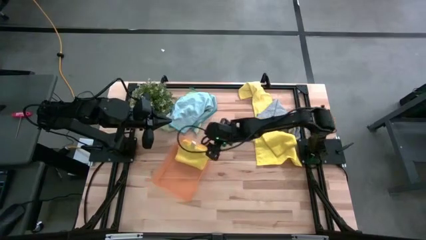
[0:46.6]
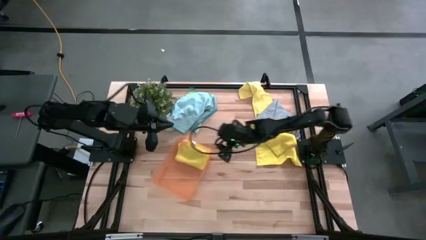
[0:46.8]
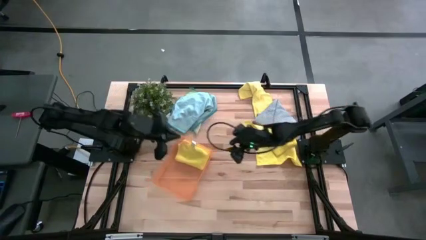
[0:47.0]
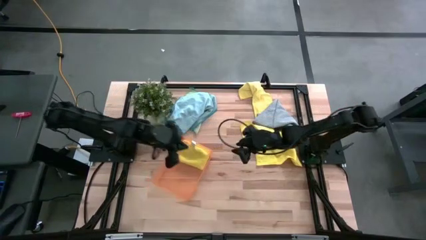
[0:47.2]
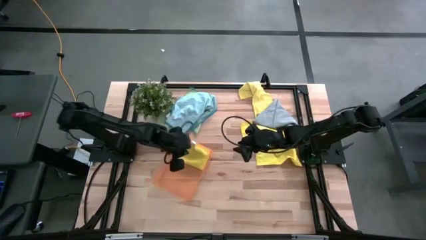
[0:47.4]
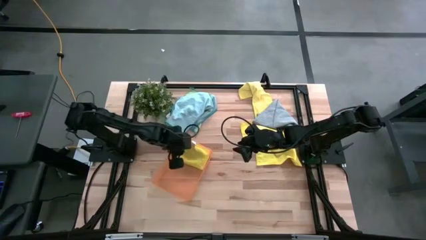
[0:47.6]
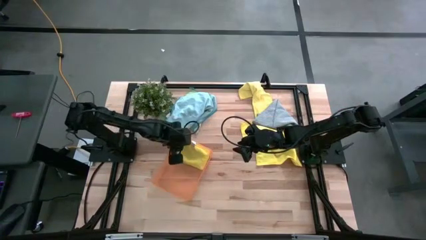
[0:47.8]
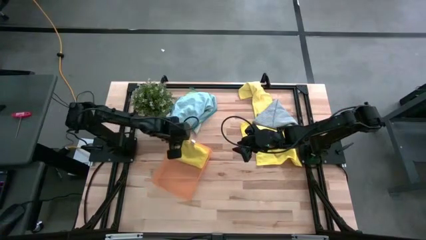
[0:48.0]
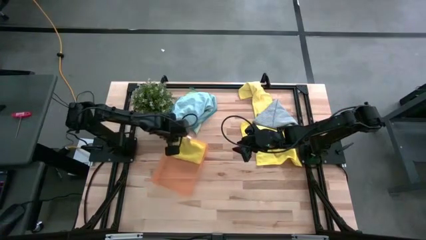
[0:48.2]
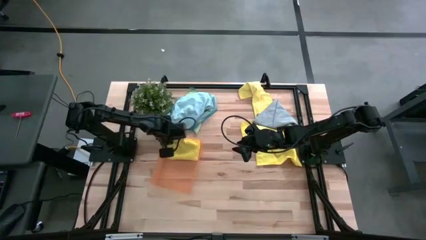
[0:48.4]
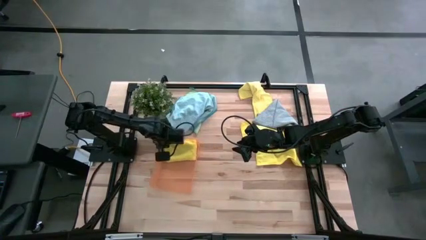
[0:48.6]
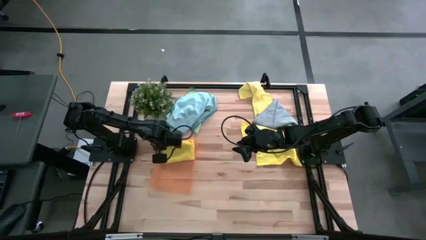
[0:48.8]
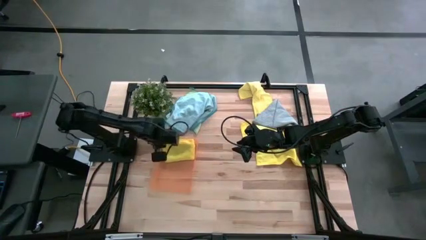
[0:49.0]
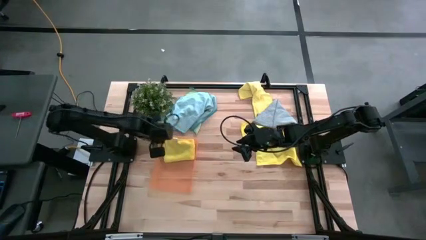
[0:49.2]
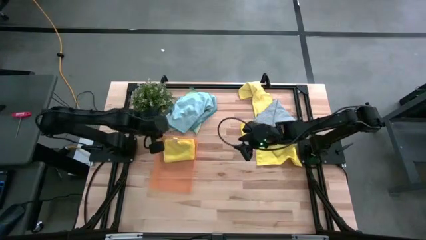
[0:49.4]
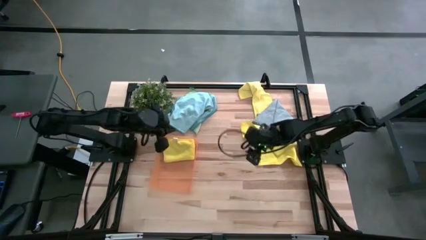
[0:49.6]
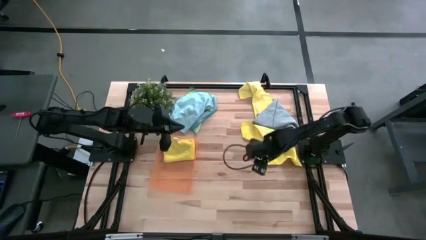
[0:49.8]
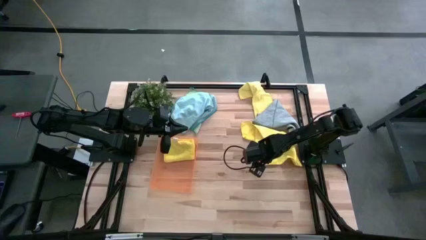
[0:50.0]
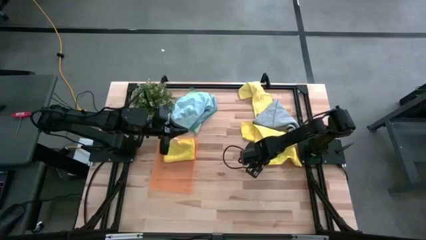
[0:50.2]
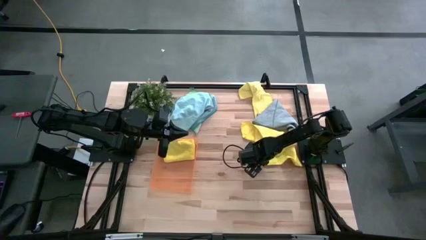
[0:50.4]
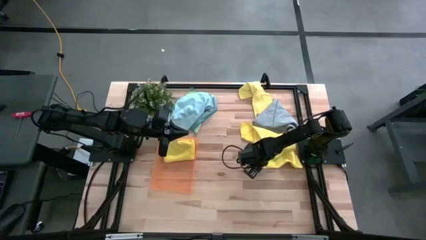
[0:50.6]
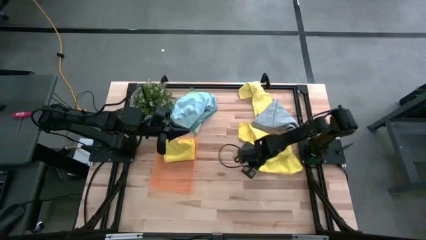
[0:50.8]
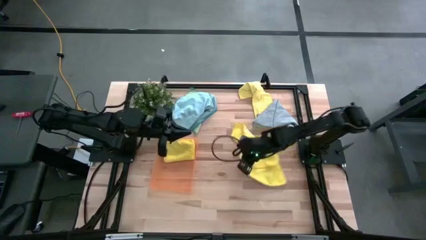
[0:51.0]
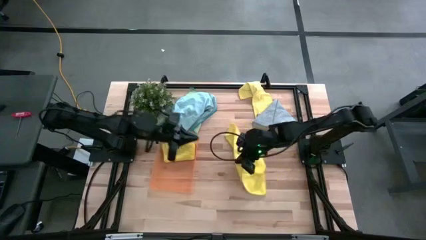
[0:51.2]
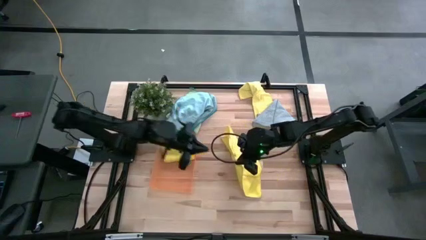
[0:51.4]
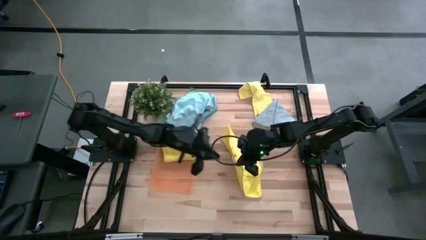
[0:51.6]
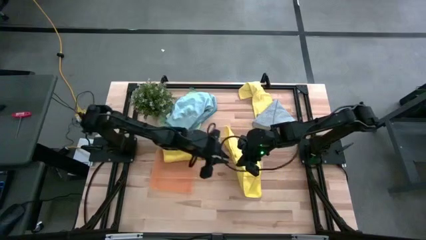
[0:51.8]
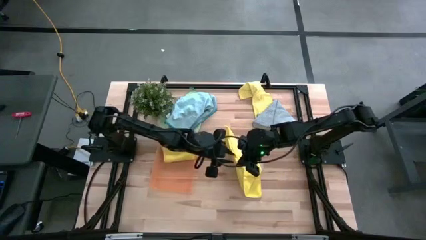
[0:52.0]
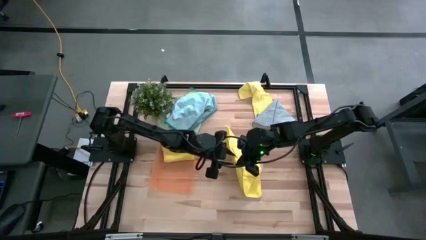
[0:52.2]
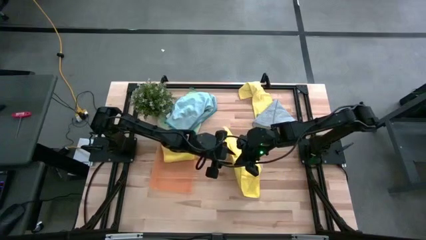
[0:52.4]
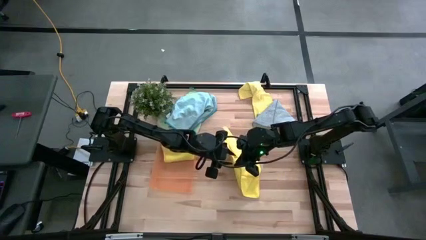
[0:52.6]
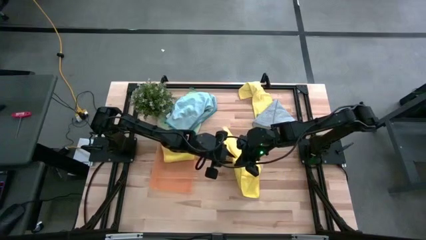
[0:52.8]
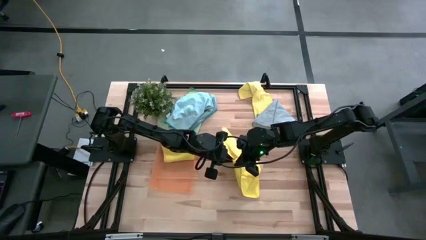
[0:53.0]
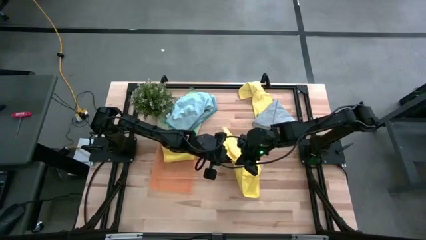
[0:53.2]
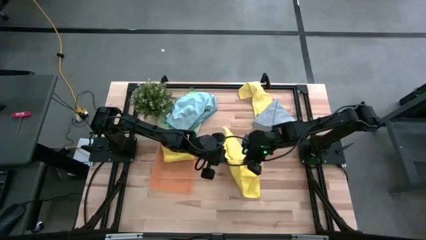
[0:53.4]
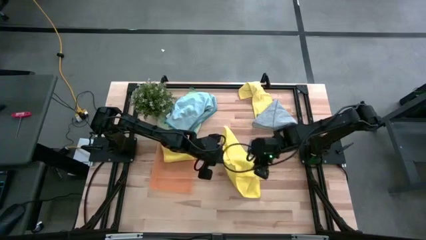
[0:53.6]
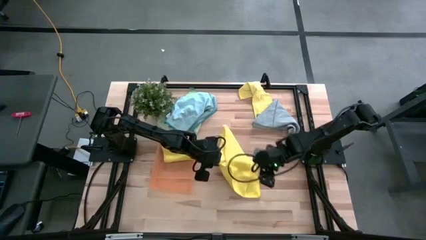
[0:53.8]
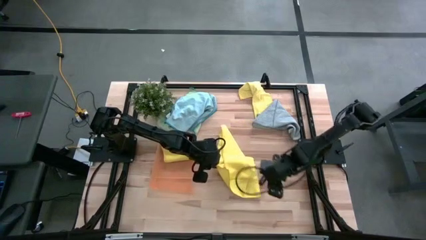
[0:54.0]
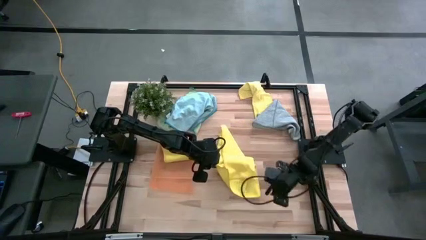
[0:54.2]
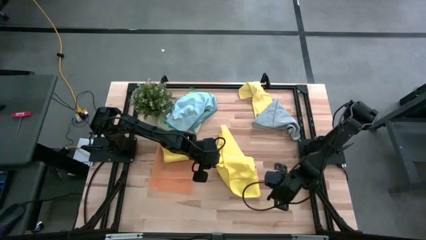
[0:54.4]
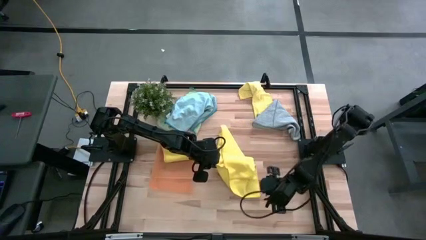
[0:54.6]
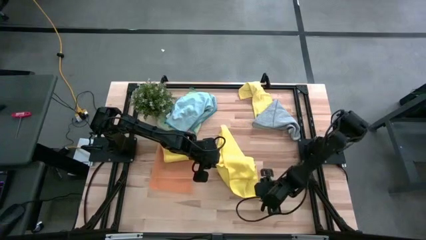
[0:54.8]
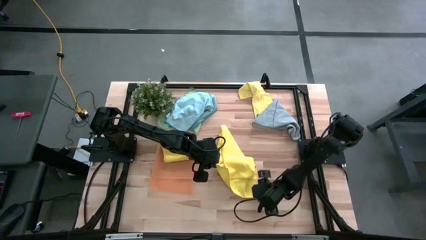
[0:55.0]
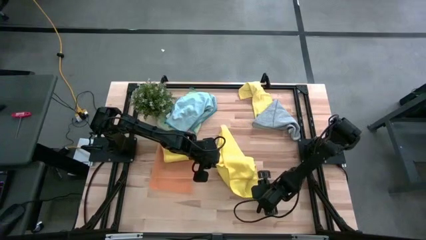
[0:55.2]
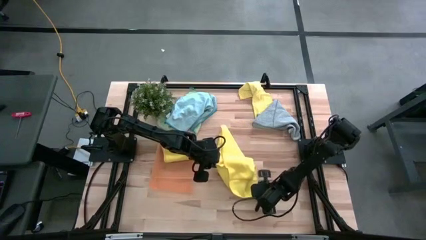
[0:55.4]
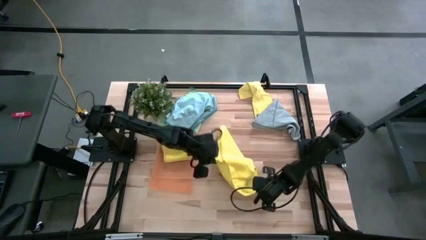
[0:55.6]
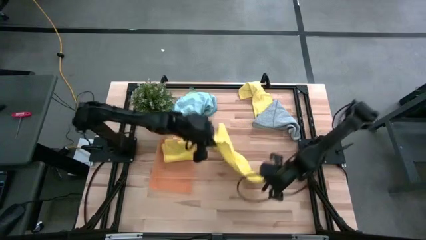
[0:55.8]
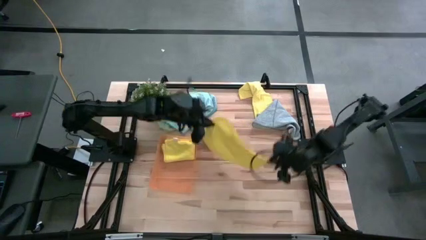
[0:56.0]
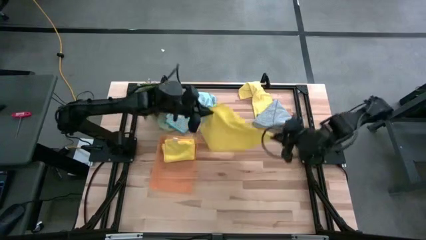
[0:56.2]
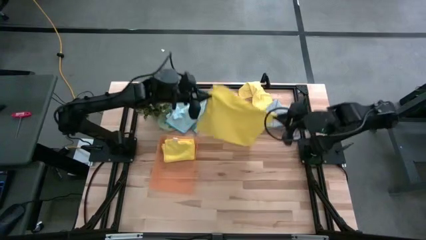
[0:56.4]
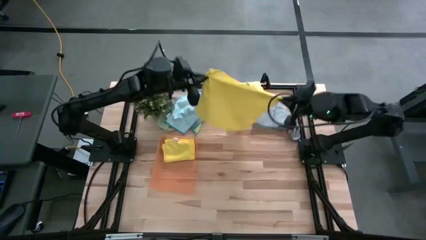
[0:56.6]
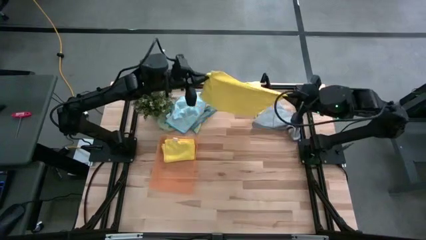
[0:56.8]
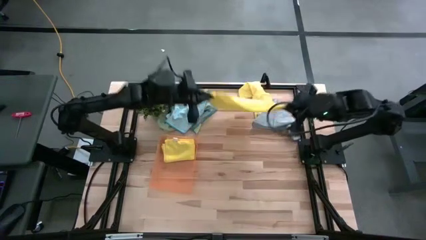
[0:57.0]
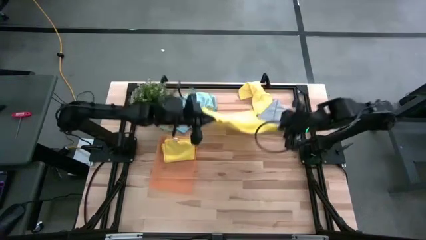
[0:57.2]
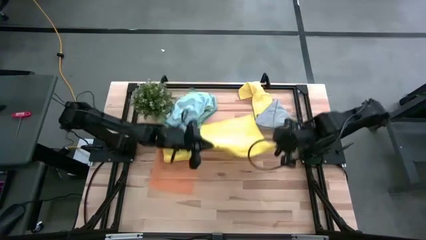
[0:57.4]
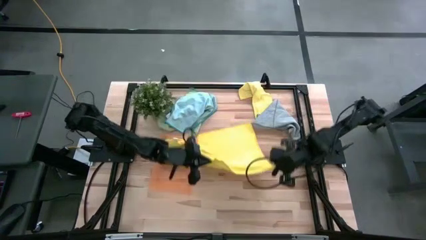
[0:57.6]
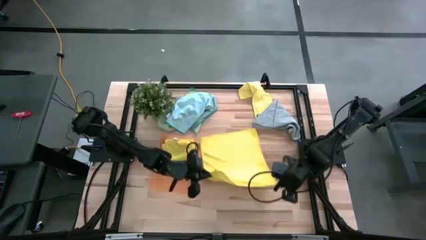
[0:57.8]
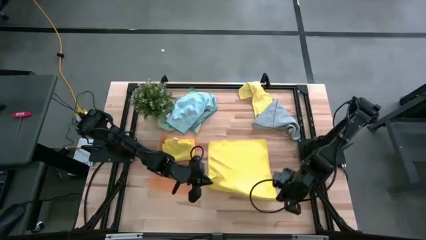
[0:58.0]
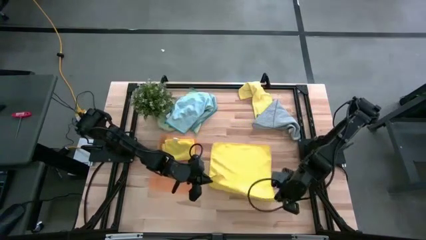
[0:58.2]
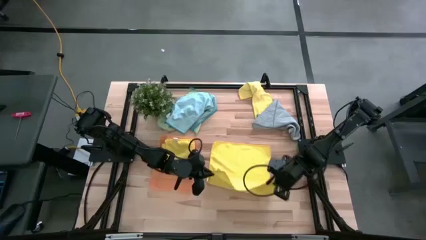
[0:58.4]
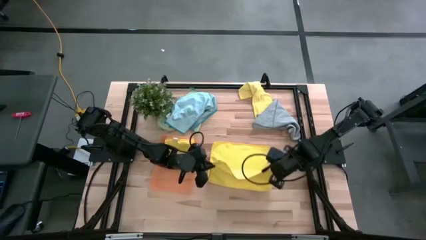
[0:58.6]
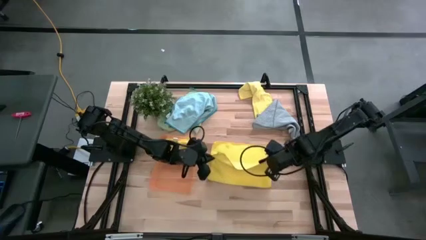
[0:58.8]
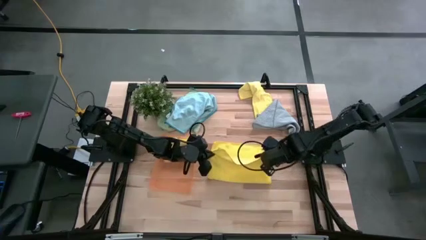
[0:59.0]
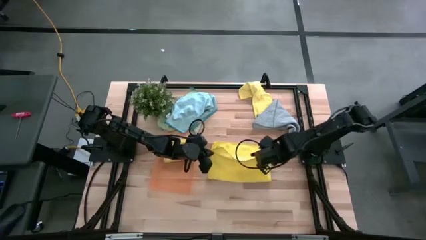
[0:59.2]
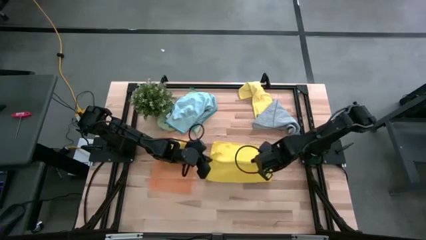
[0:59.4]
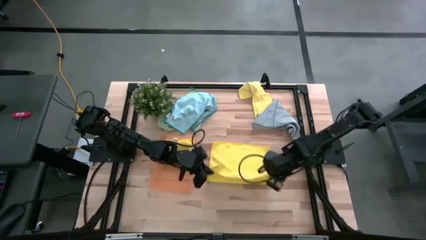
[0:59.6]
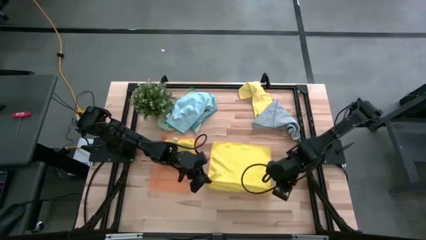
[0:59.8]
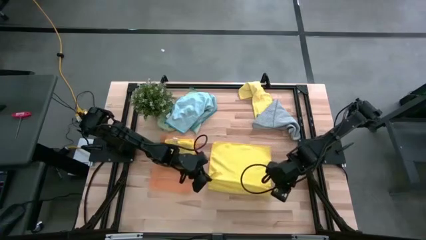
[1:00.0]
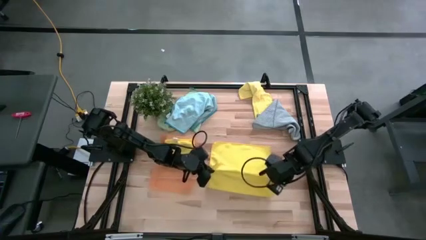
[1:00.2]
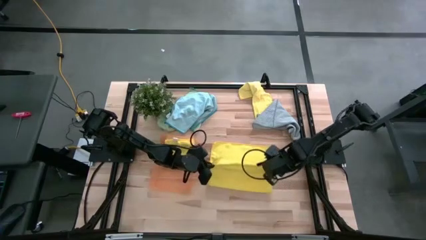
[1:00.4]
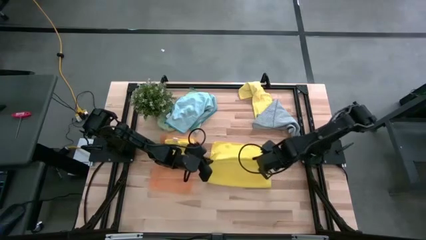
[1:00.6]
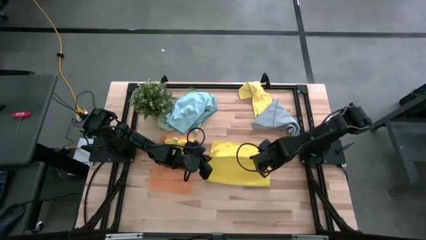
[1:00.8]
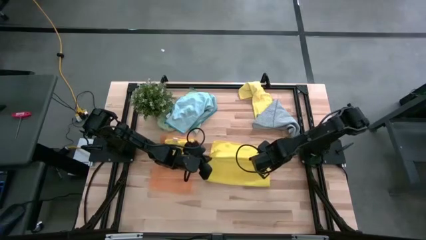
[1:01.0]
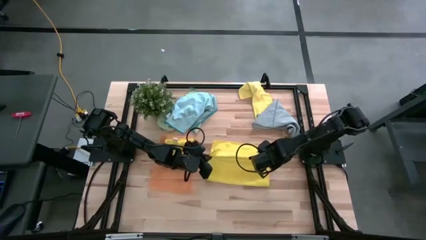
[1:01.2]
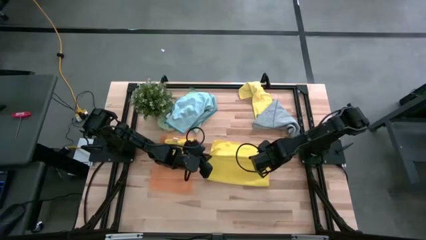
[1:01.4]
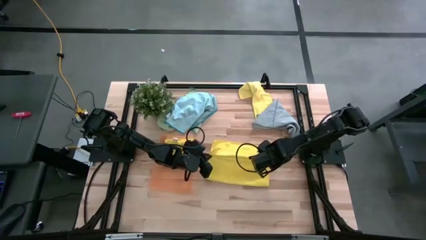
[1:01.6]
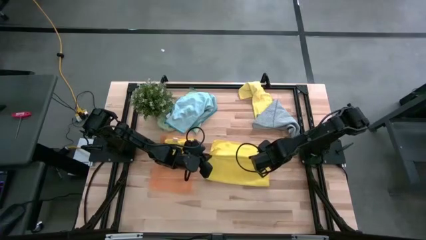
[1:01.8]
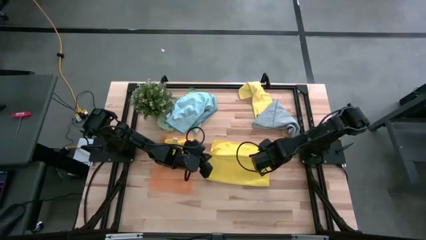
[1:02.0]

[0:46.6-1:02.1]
Task: Fold microfiber towels
Fold the middle right yellow microfiber towel
